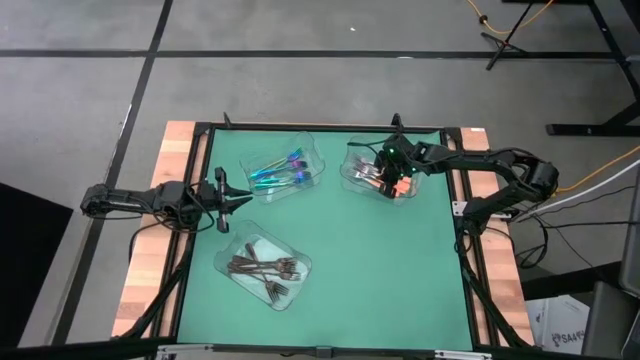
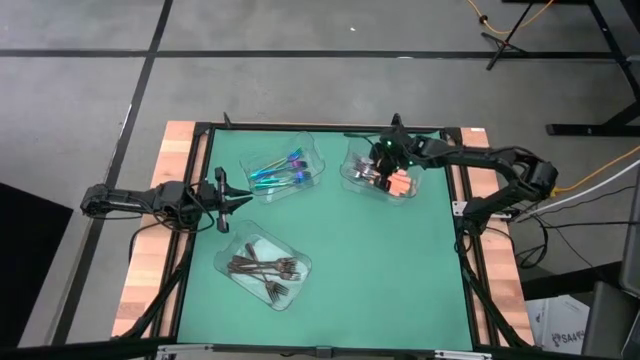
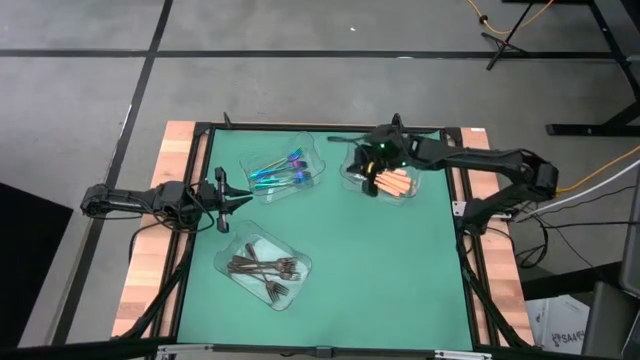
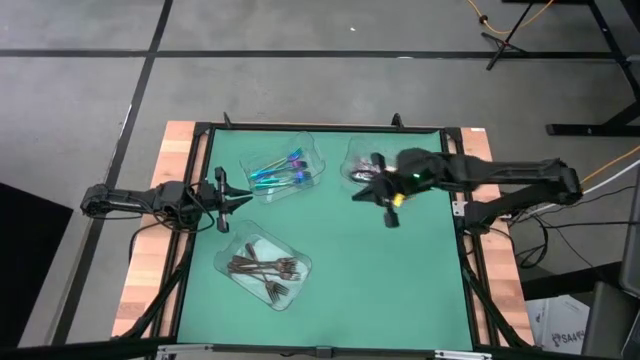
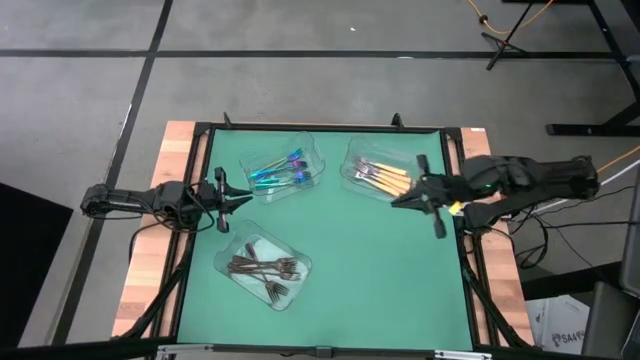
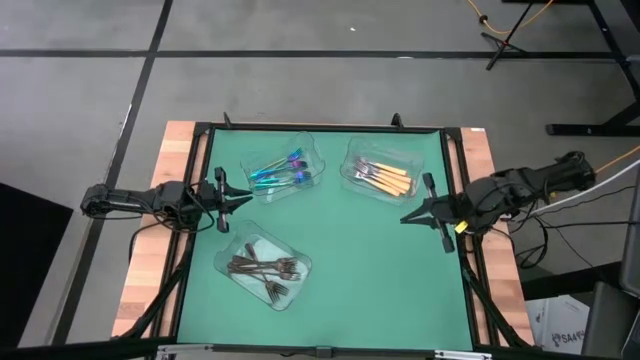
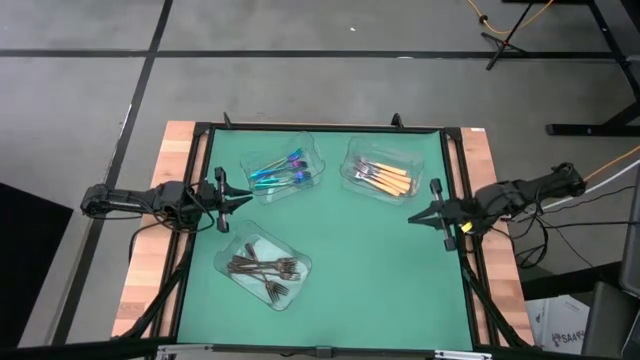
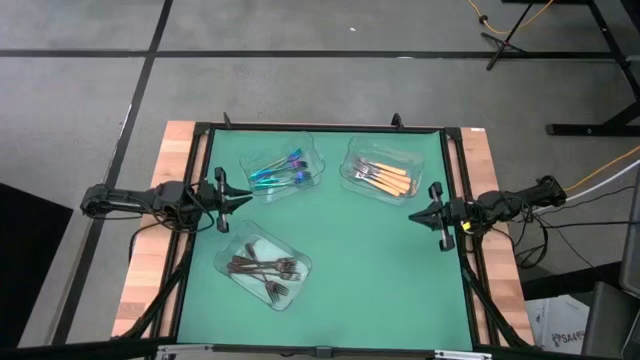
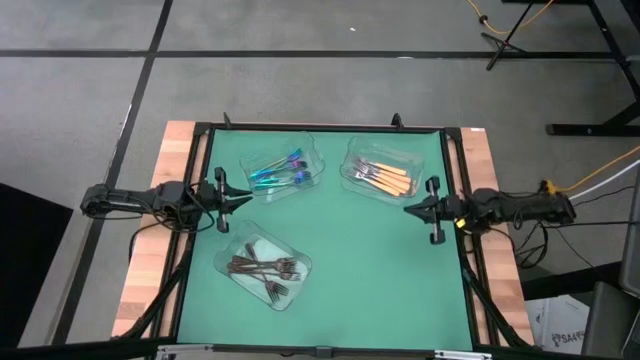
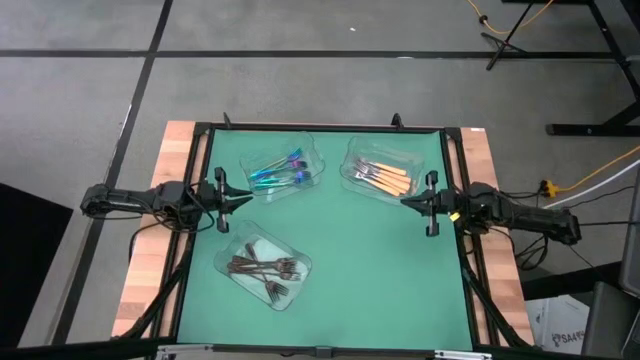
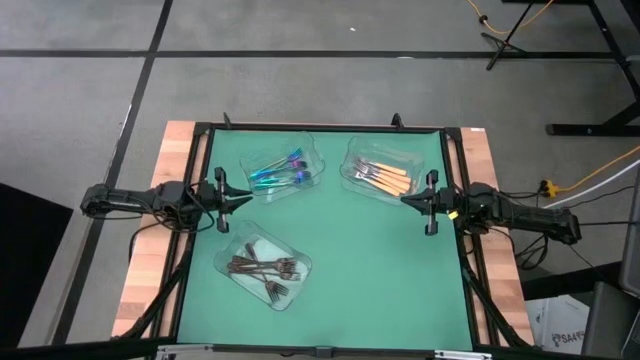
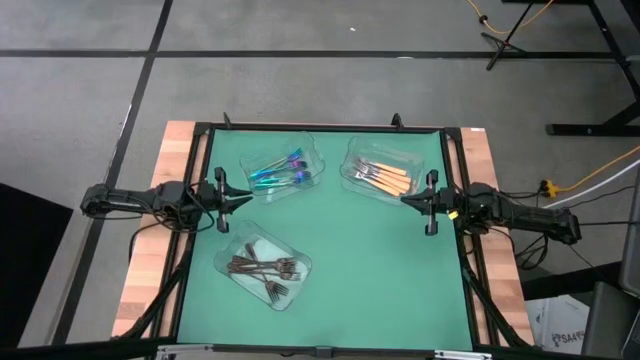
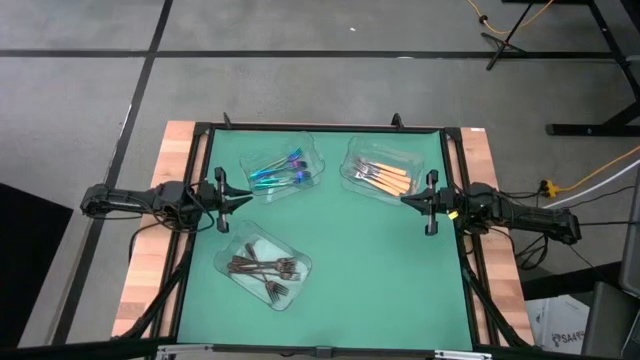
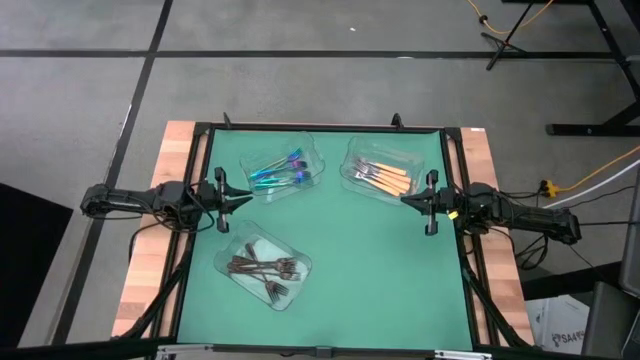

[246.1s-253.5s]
Task: Sort silverware by color (type)
Return to Home position

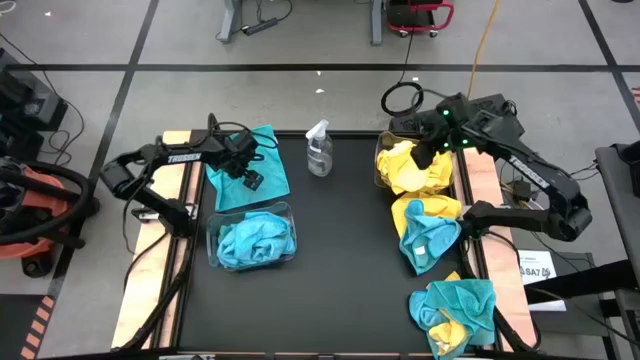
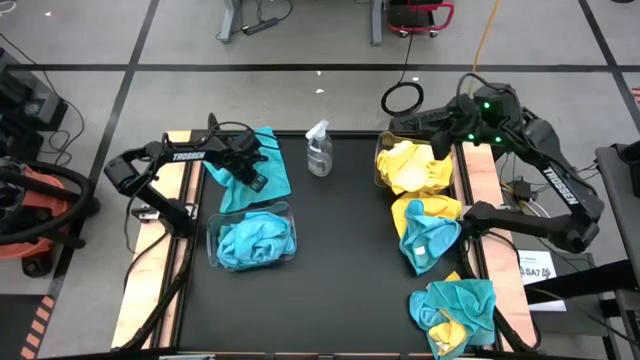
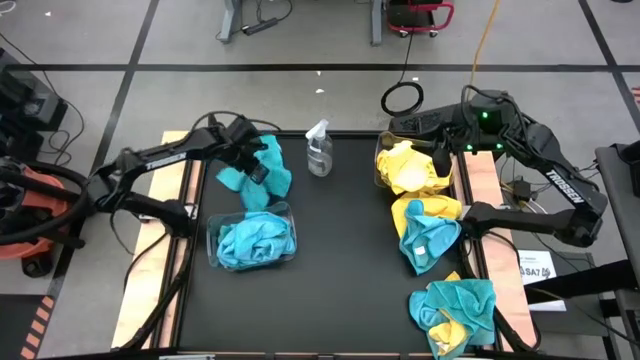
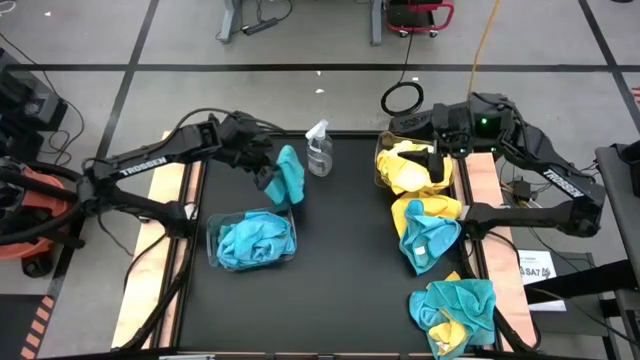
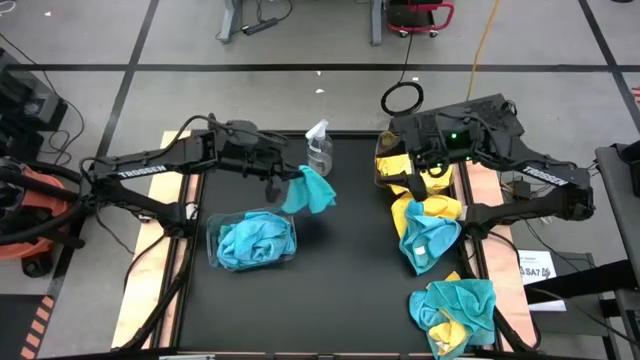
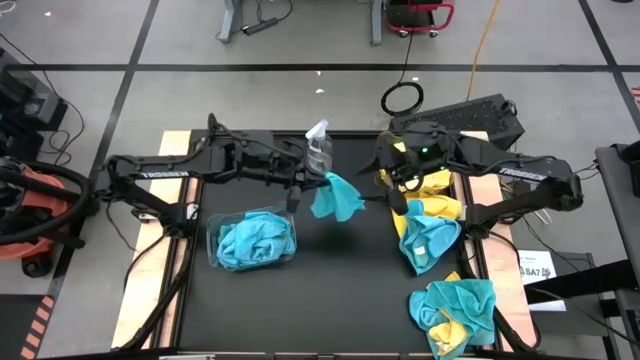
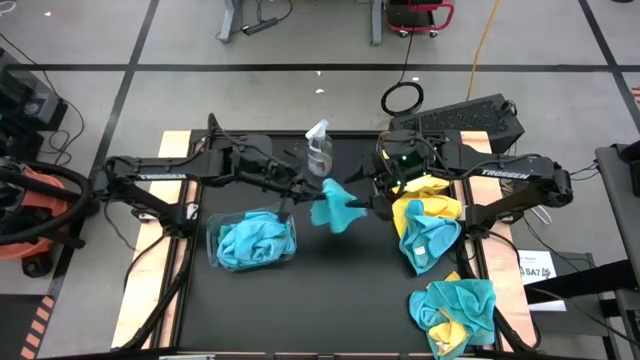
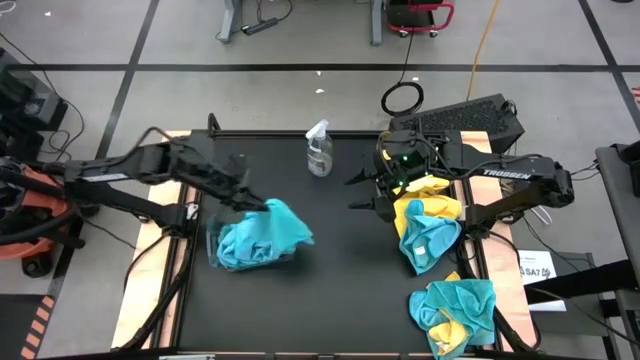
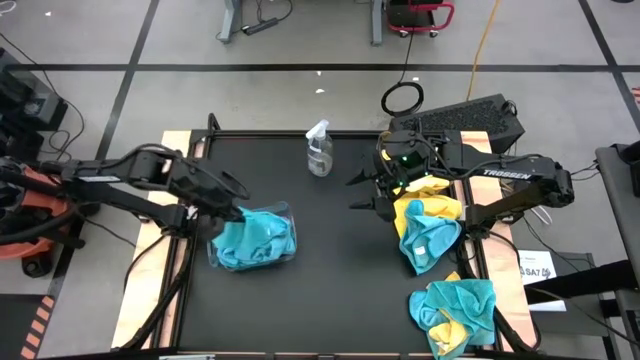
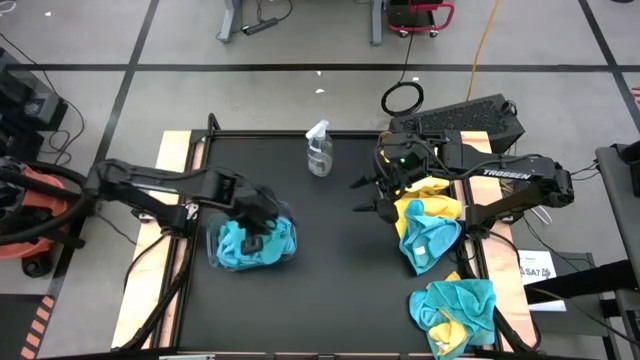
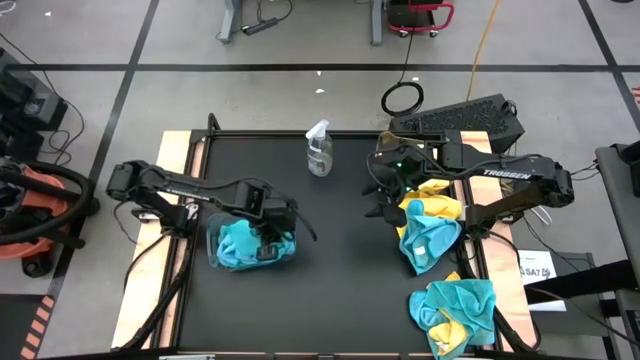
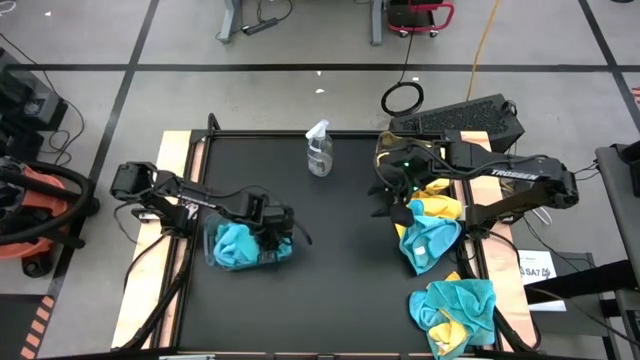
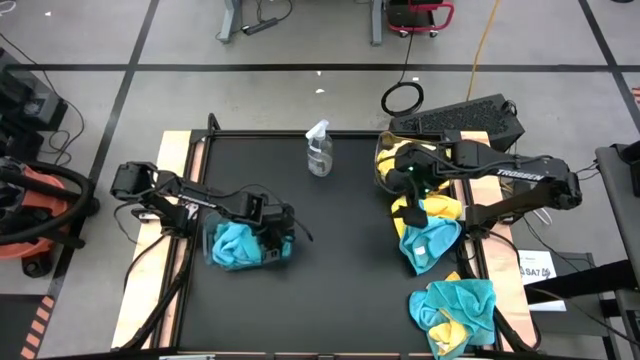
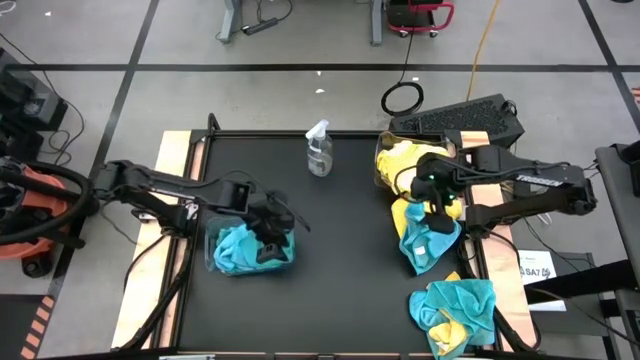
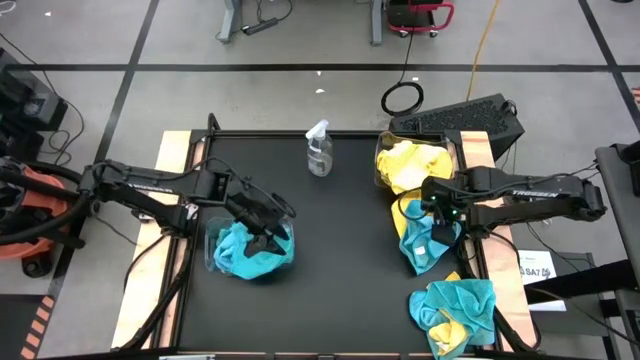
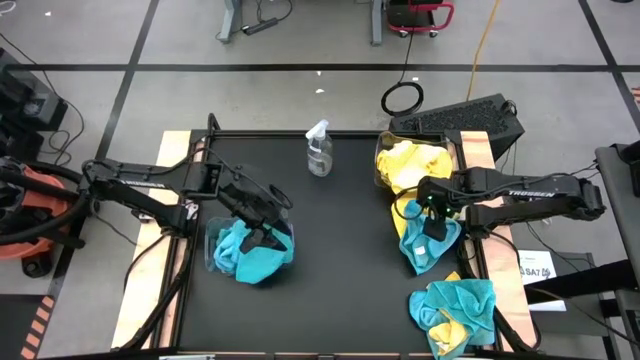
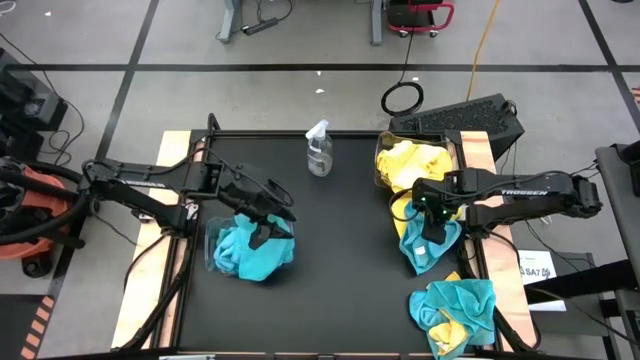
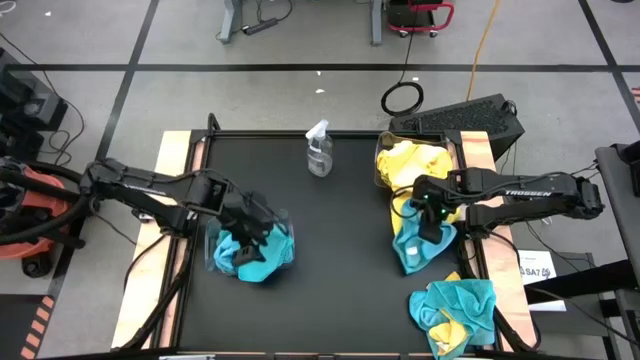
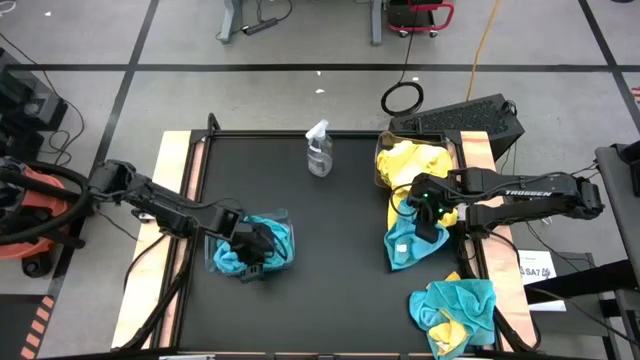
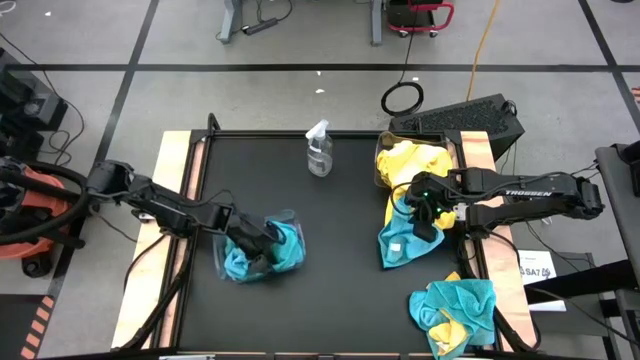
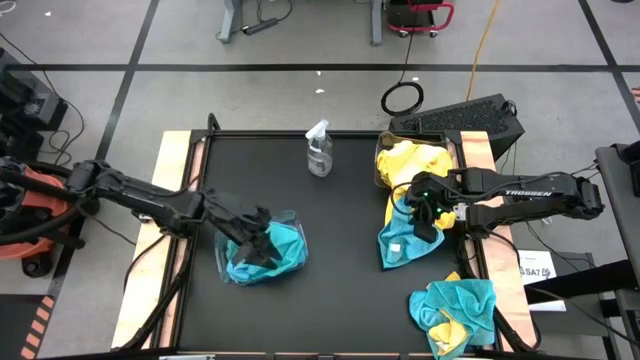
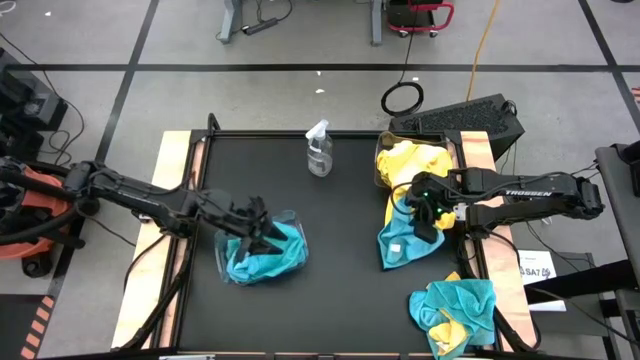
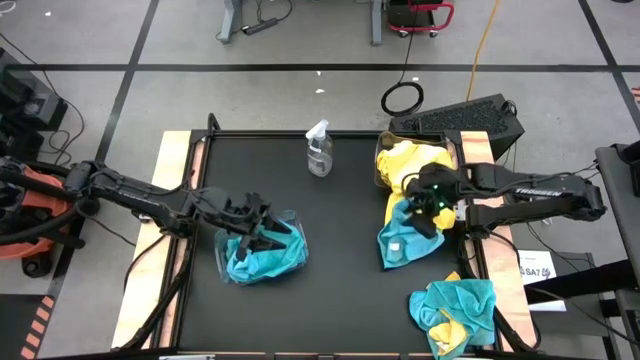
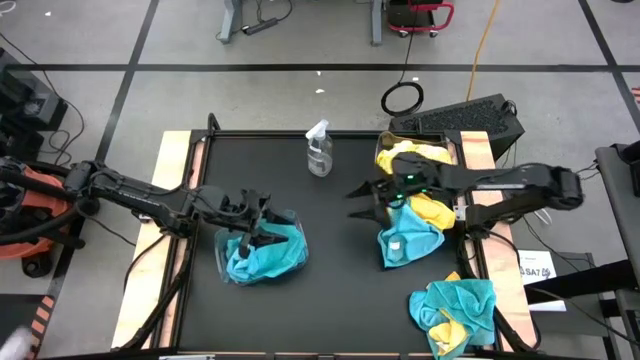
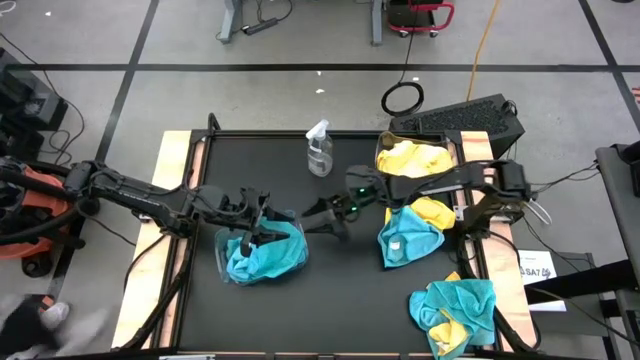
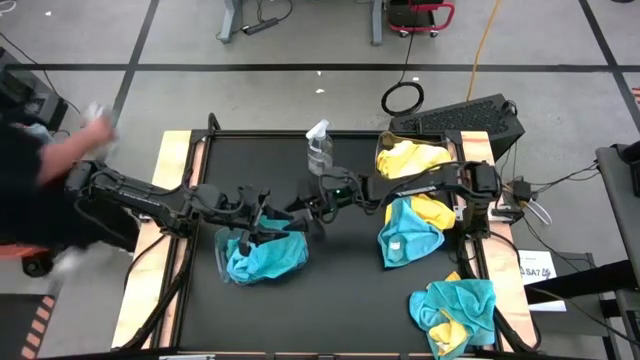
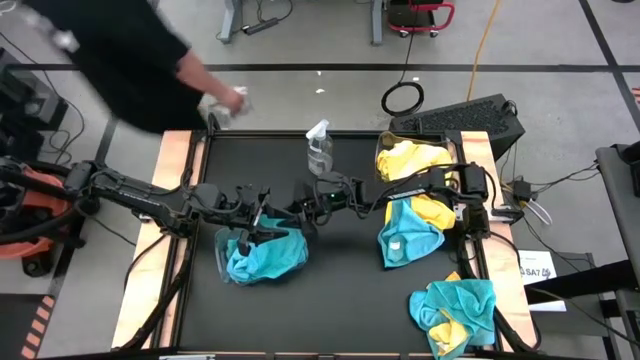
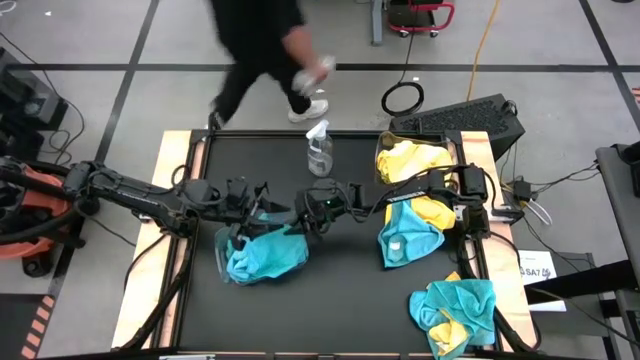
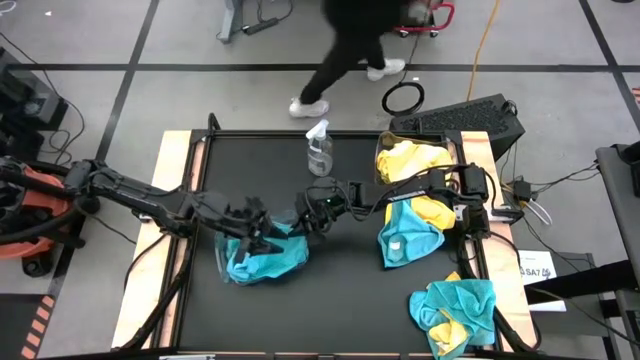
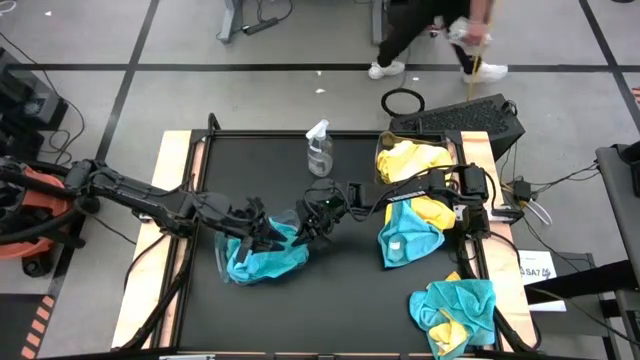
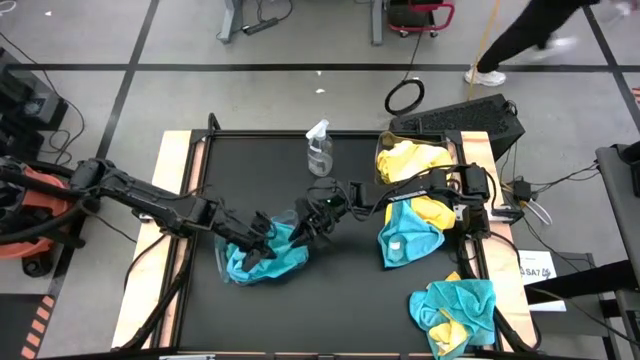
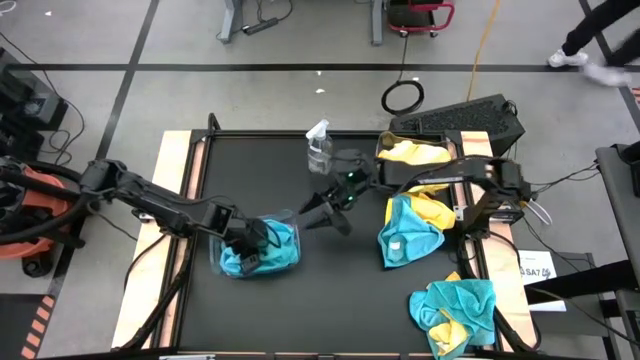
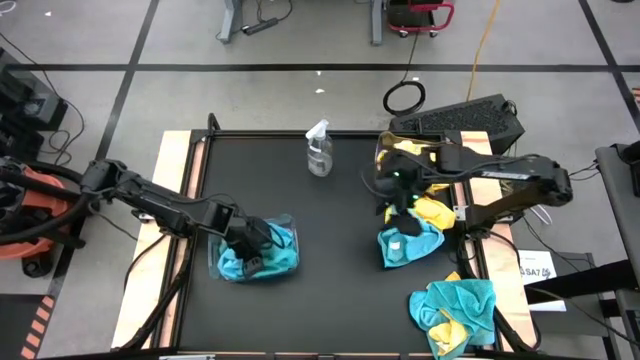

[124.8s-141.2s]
Task: Sort microfiber towel by color & place in baskets
Put the blue towel into the bottom transparent bin
